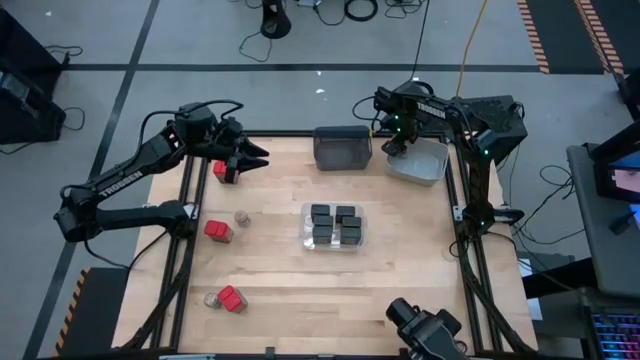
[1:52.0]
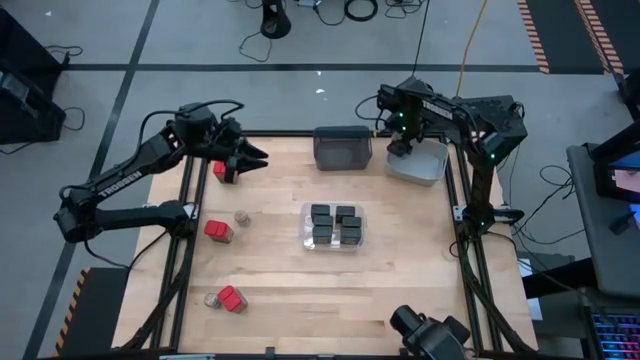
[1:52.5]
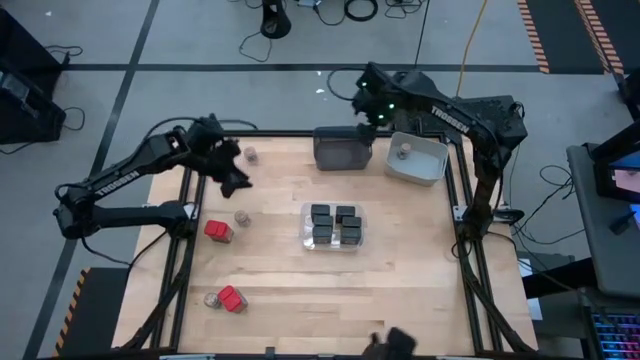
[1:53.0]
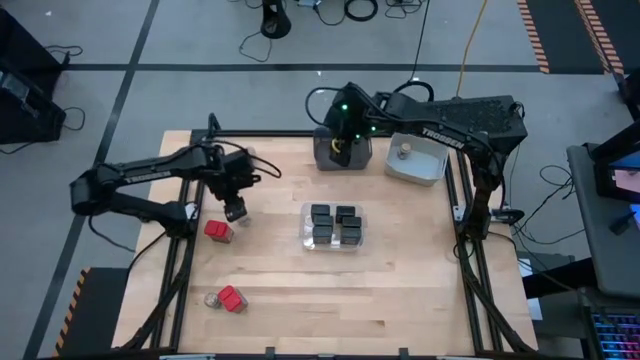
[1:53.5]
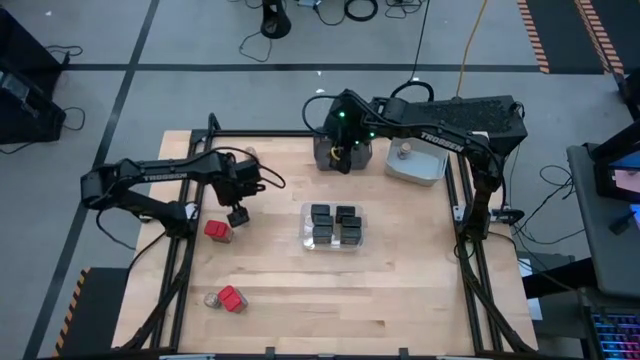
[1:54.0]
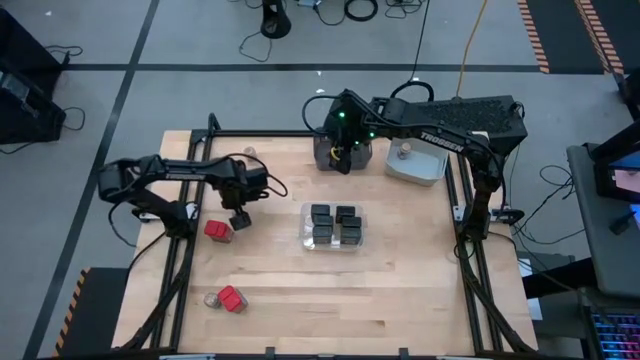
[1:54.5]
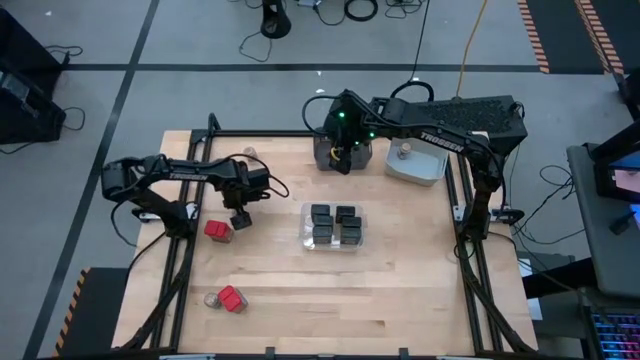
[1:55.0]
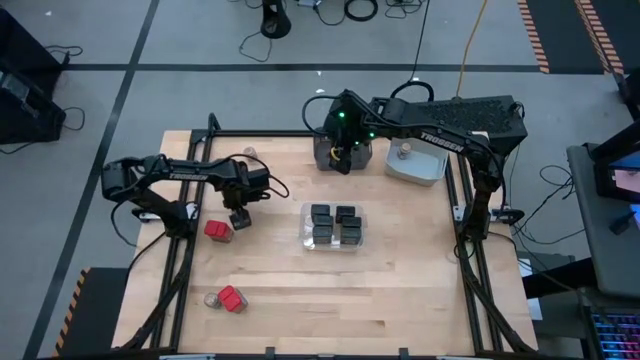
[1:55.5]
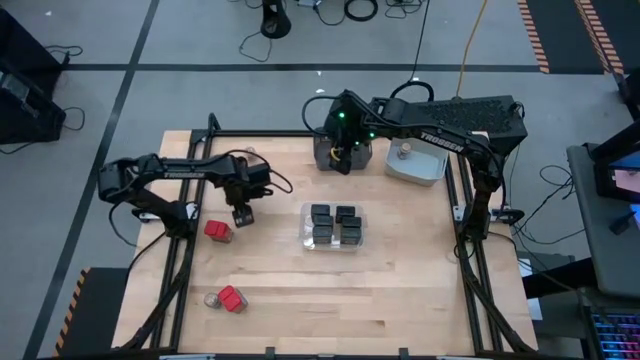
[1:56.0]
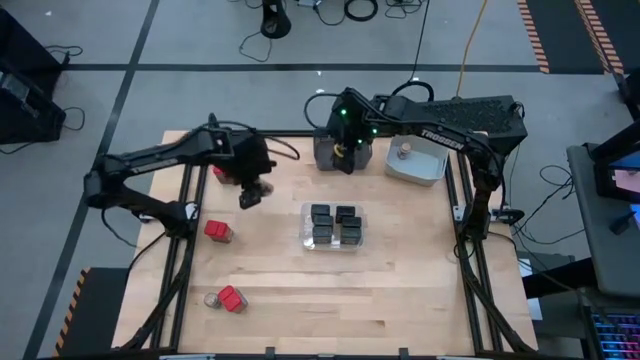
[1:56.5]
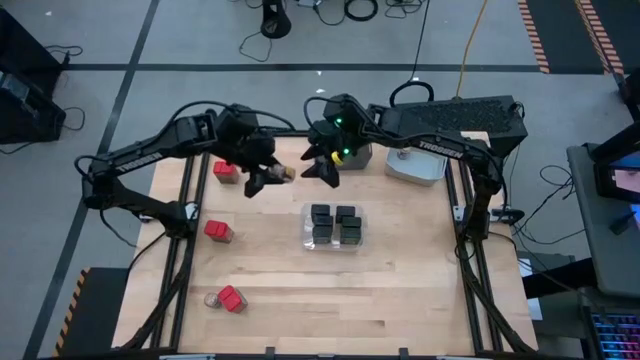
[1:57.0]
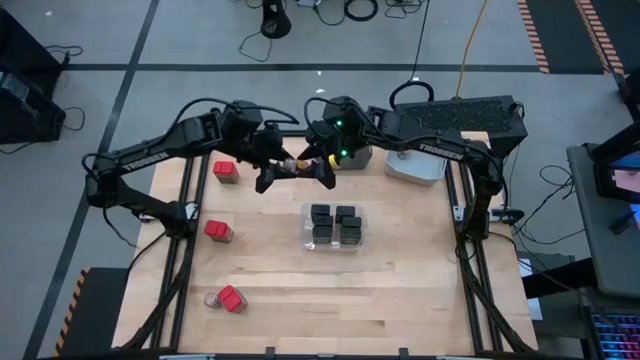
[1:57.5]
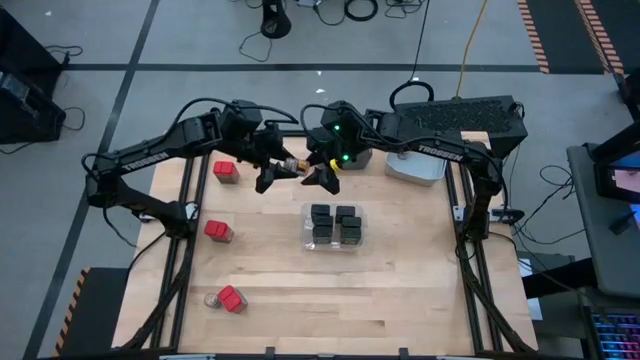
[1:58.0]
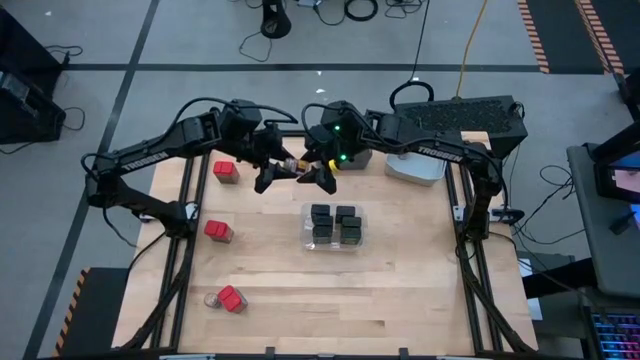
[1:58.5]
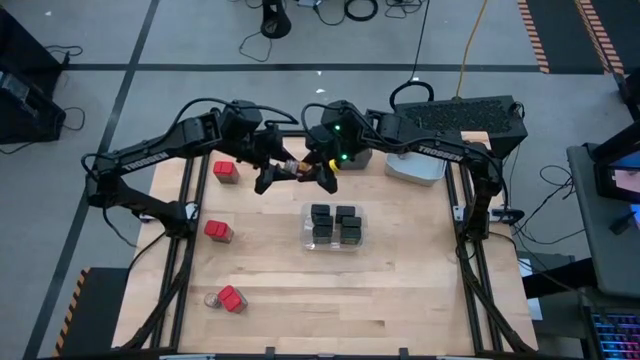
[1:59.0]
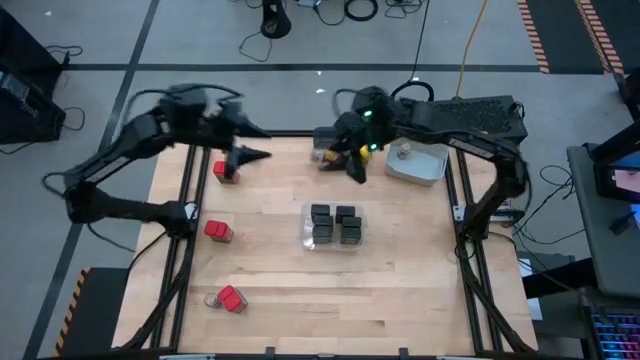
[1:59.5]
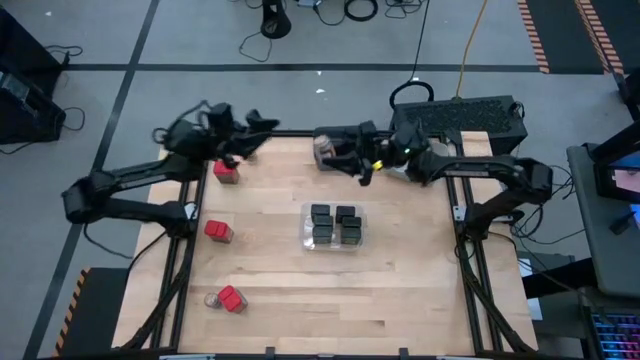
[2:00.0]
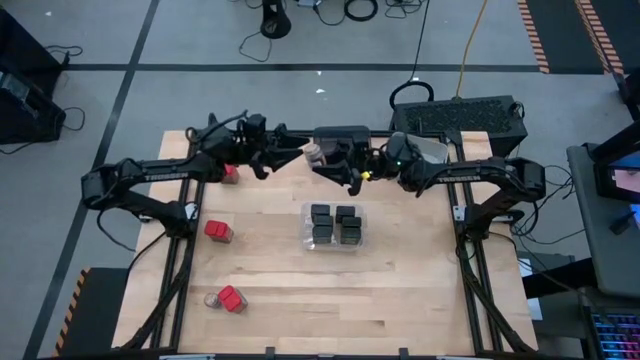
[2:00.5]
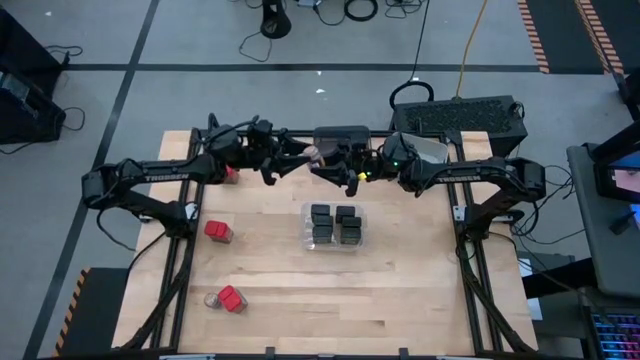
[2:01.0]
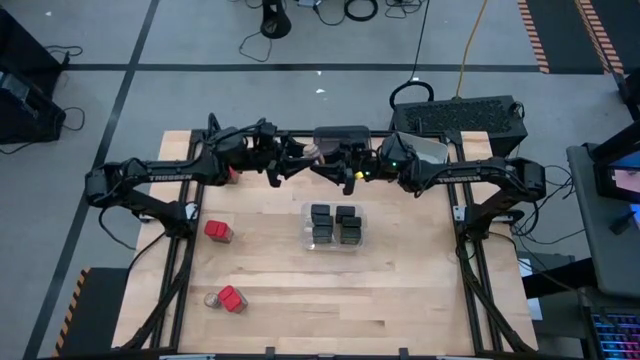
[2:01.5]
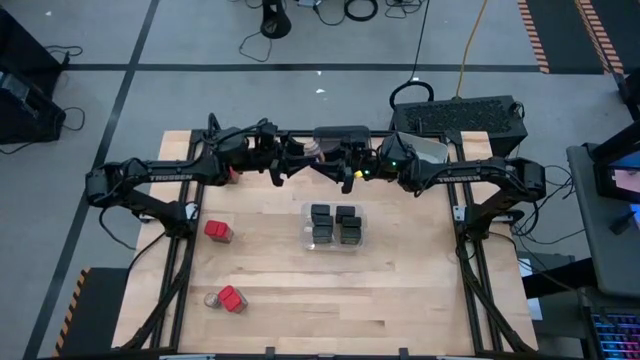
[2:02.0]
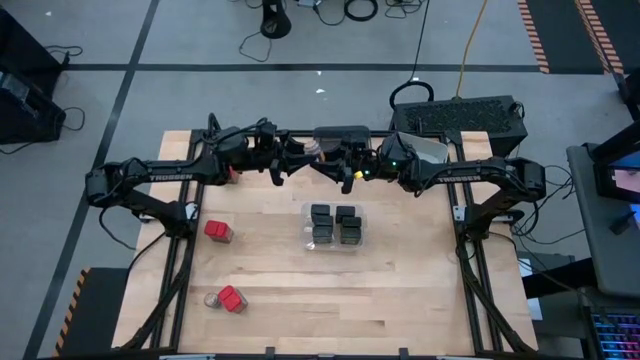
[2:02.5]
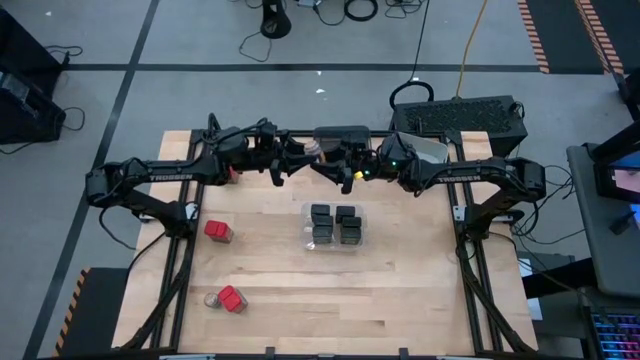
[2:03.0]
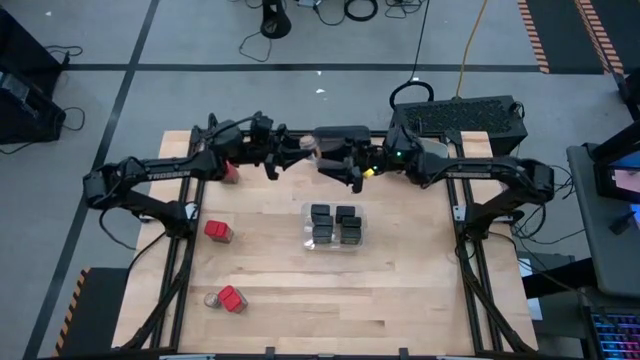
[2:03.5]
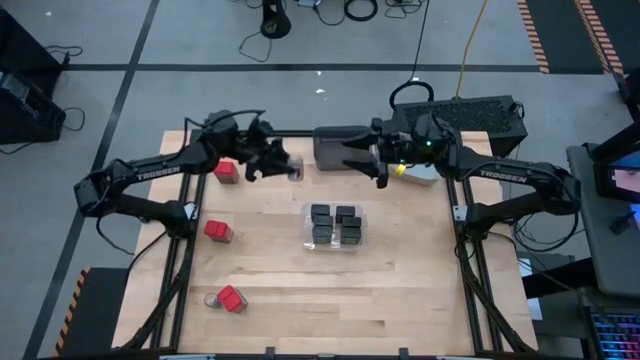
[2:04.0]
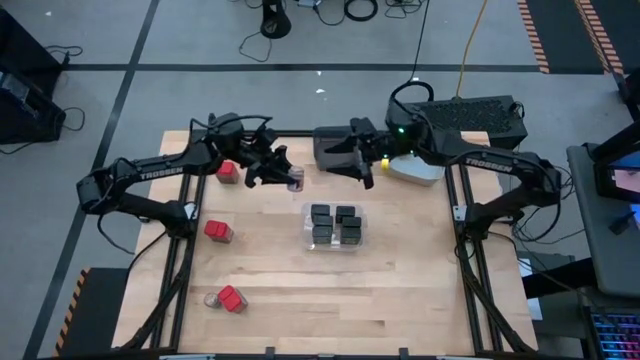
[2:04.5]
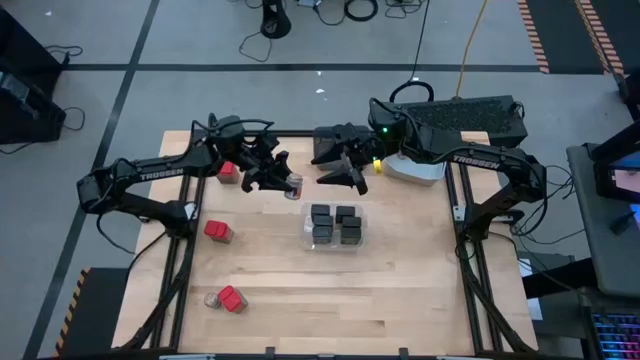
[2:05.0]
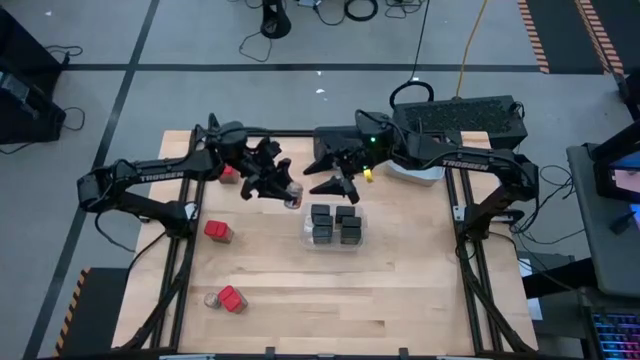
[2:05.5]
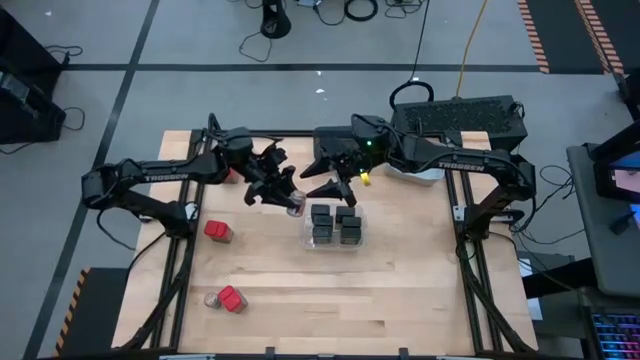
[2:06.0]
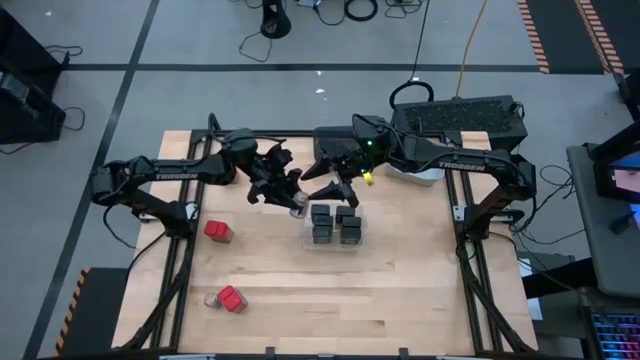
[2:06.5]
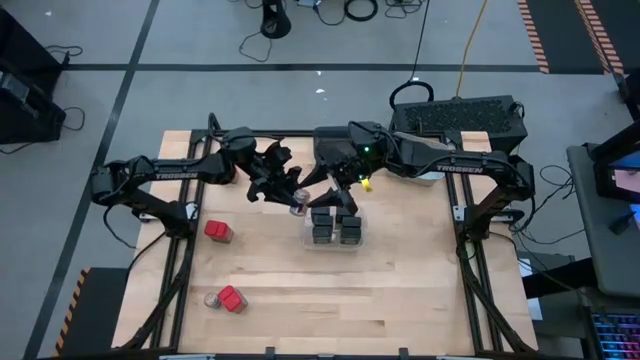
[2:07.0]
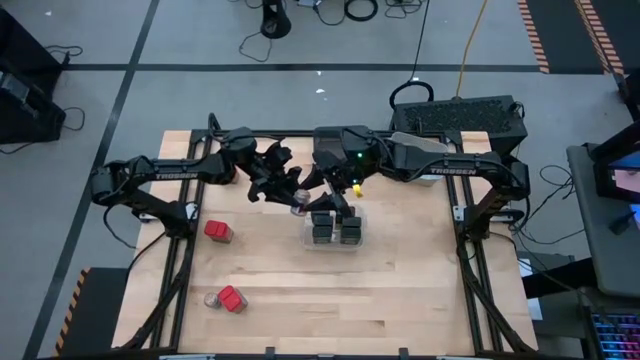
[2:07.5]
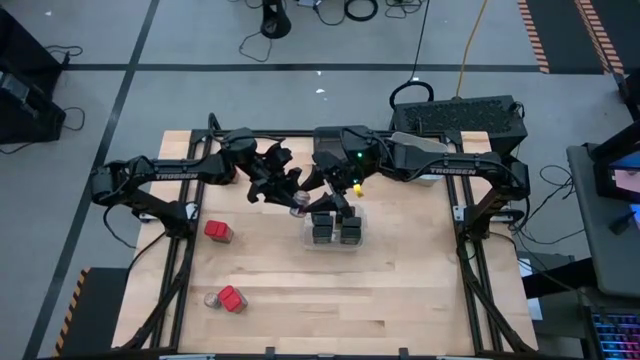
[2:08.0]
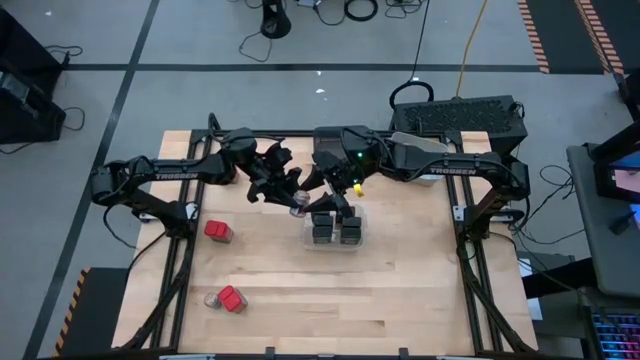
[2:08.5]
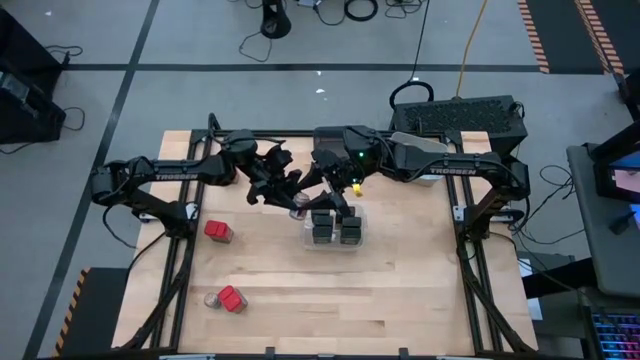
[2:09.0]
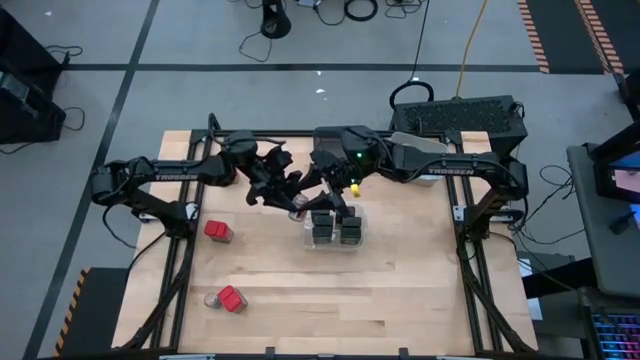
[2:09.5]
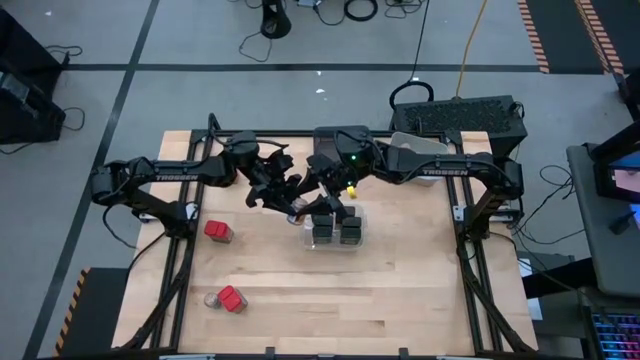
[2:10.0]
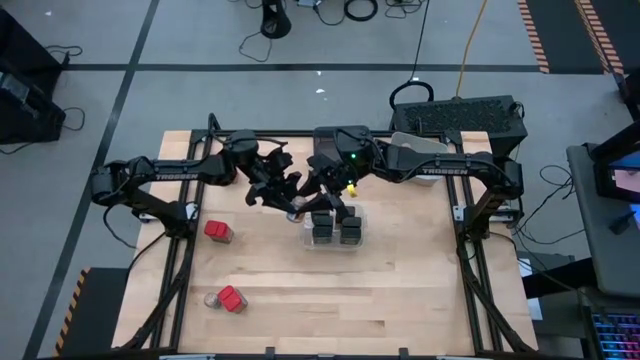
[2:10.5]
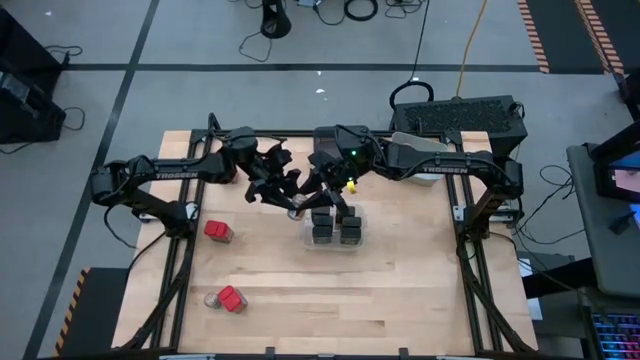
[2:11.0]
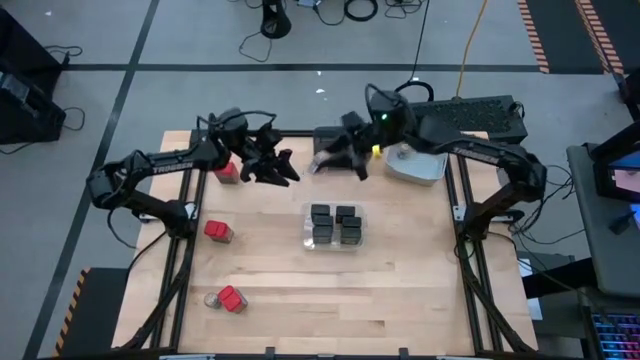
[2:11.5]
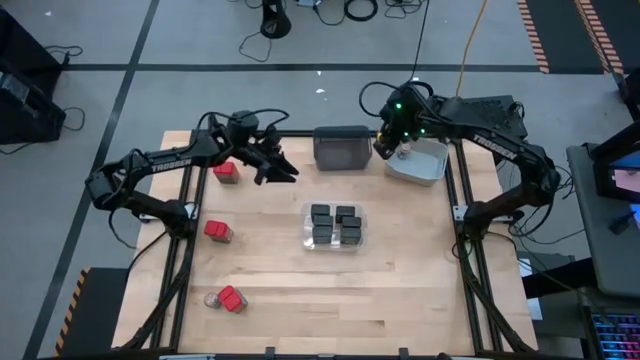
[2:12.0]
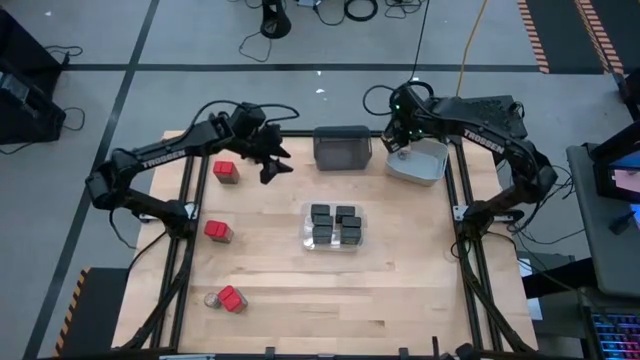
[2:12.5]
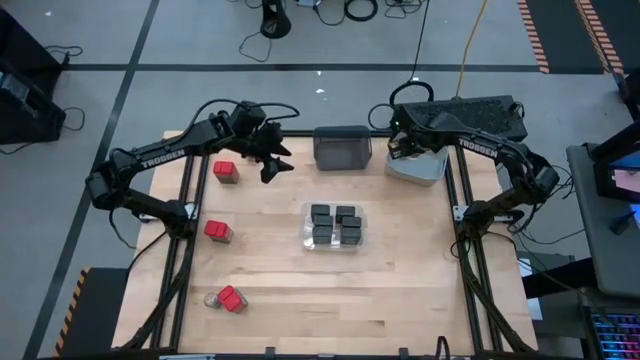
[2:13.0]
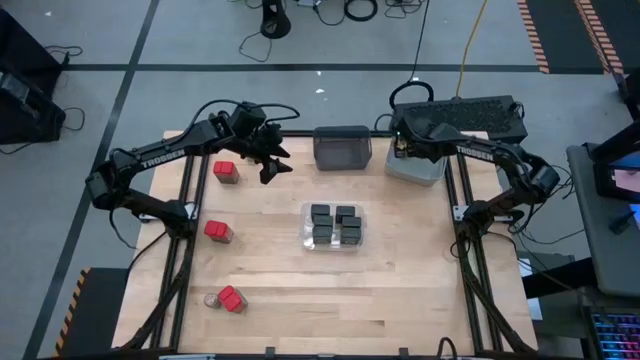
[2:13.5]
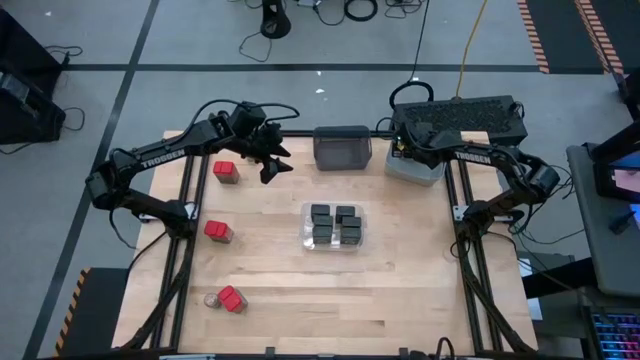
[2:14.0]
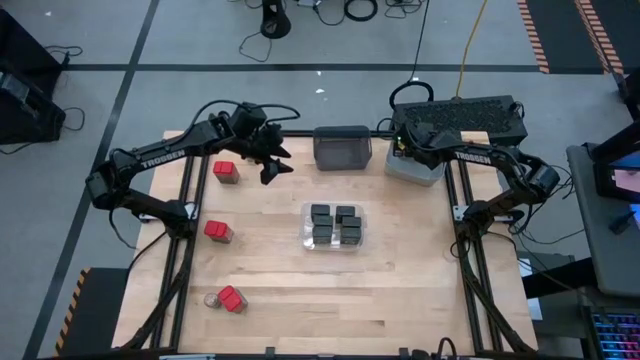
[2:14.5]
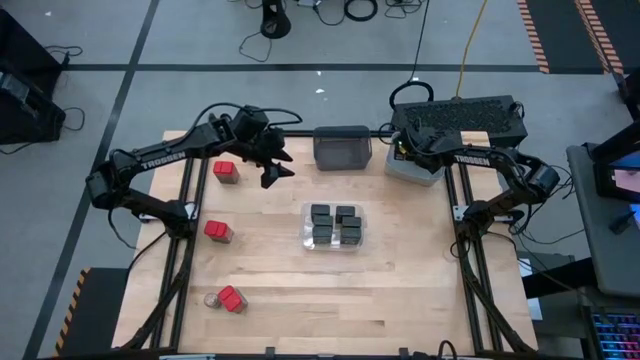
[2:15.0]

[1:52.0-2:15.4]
Task: Sort spices by type
Put the brown seasoning bottle into the gray bin
